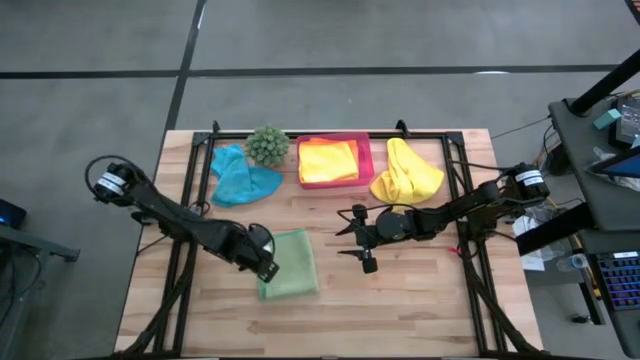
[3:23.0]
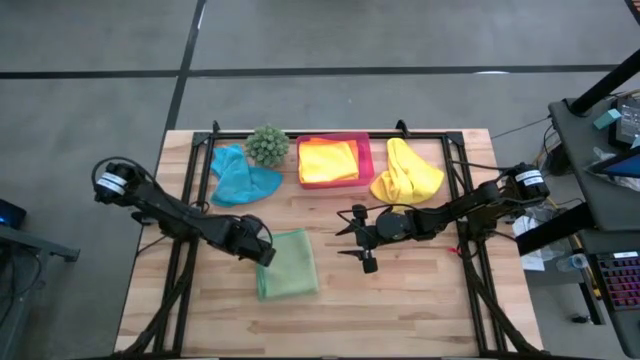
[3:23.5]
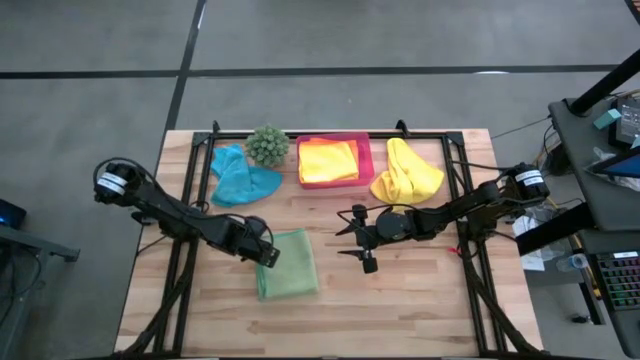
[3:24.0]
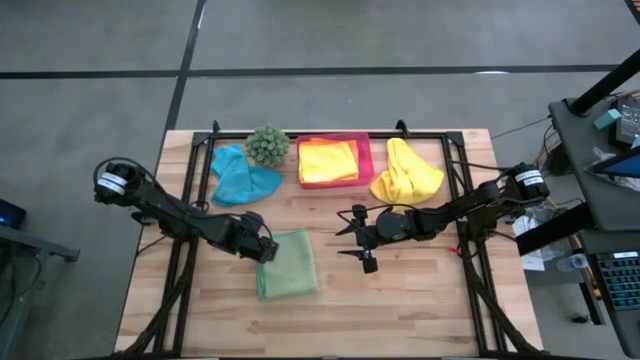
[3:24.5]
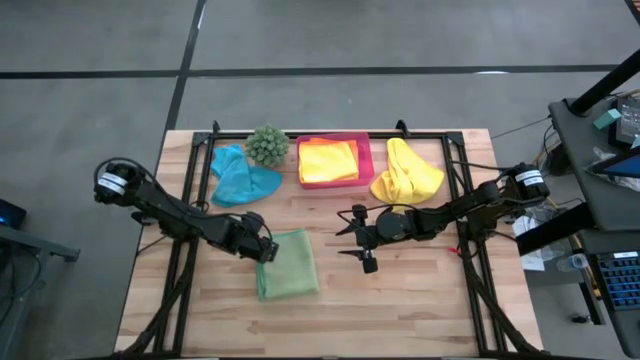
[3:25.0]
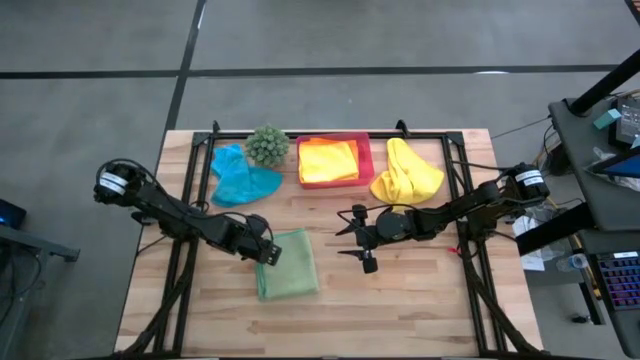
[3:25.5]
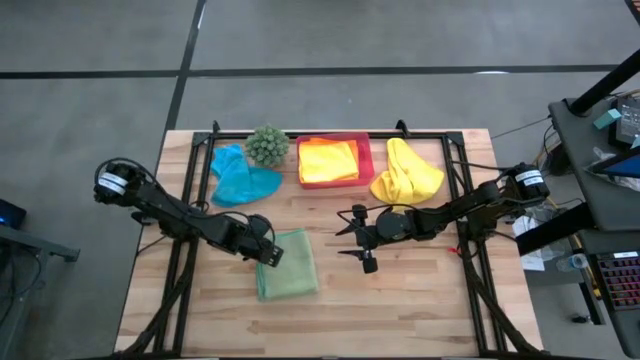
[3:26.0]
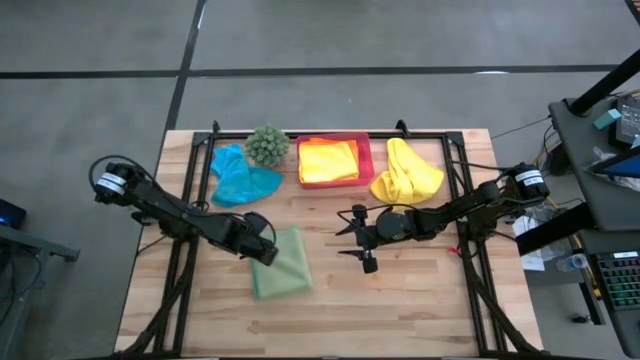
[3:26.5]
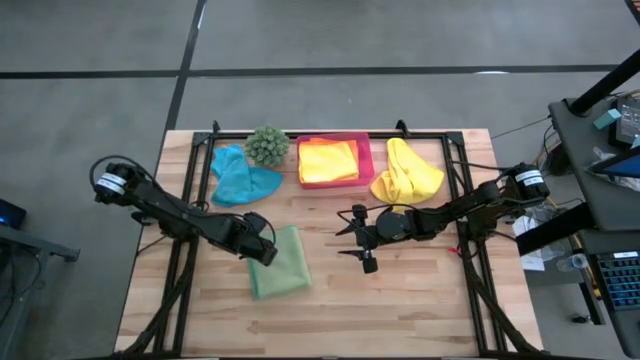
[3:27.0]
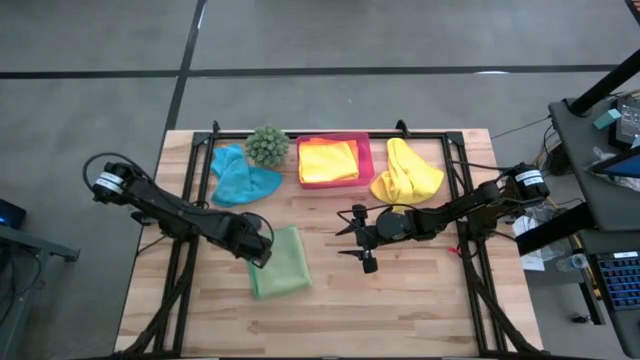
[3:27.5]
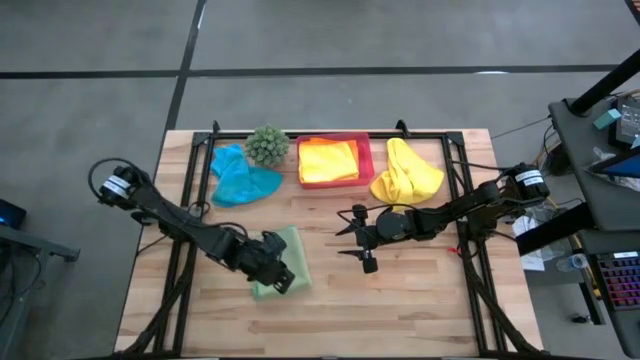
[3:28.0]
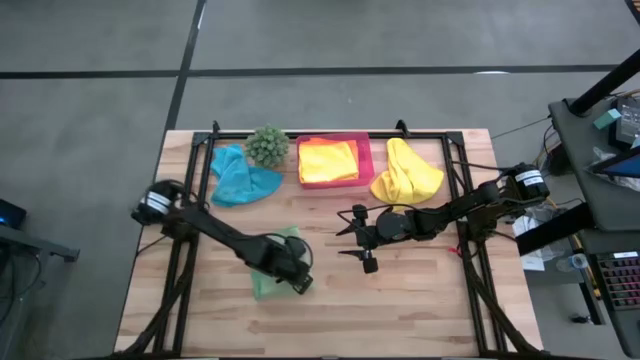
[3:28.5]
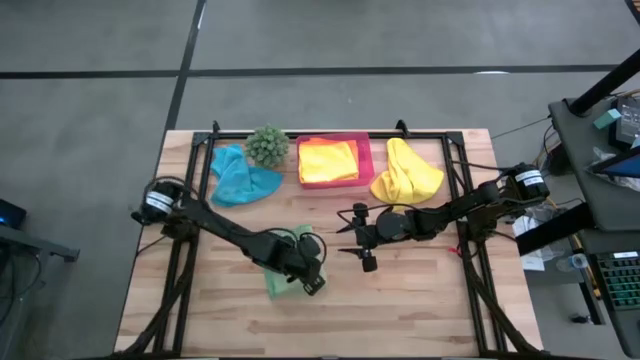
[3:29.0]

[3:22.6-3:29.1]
Task: Fold microfiber towels
Fold the green microfiber towel

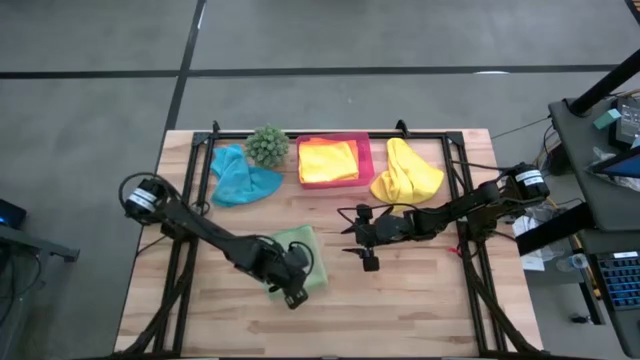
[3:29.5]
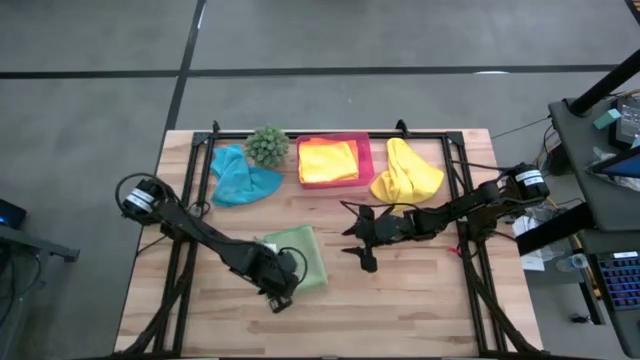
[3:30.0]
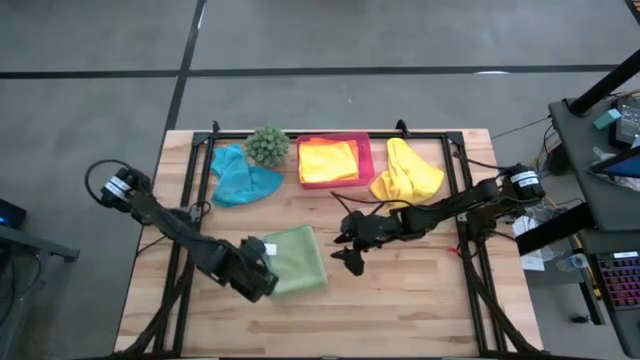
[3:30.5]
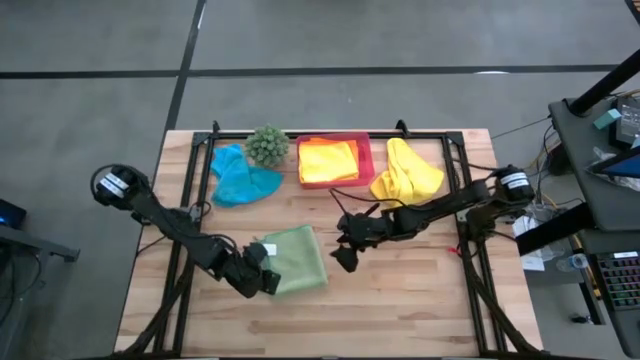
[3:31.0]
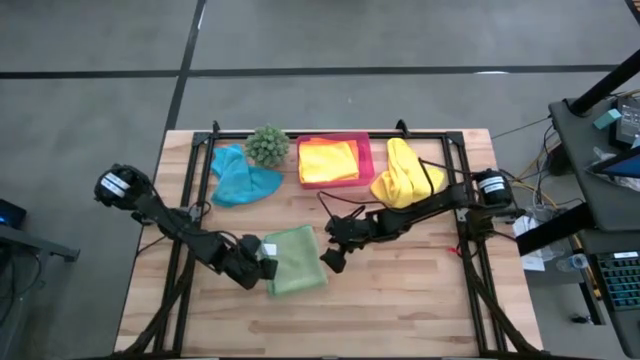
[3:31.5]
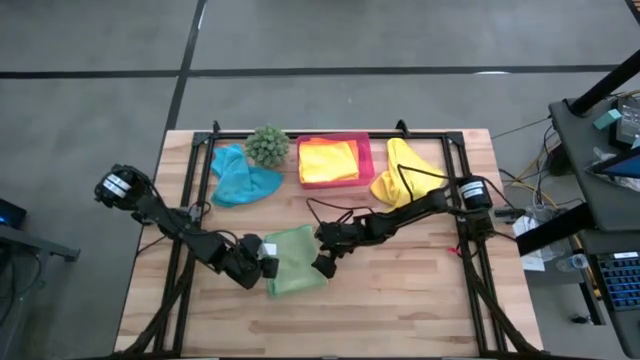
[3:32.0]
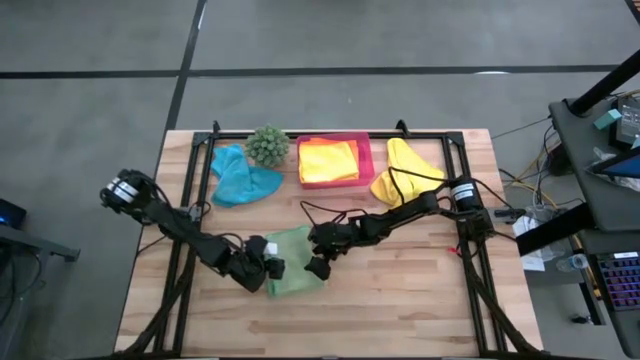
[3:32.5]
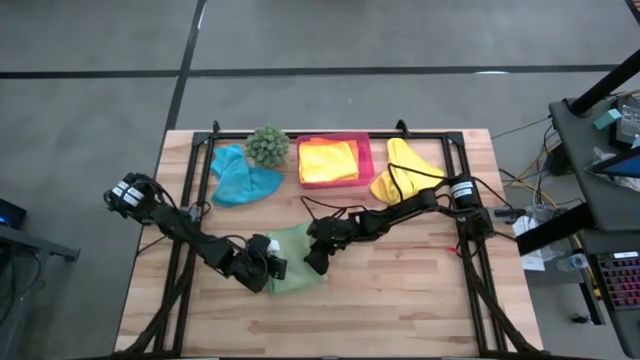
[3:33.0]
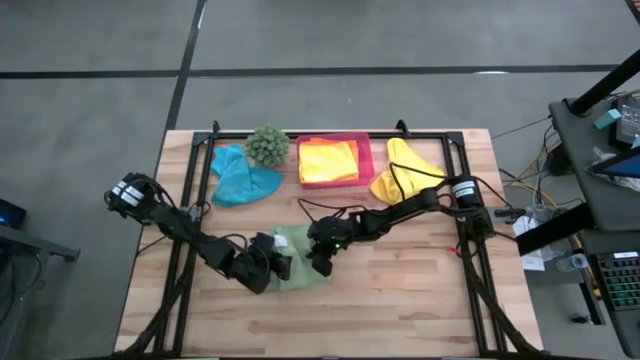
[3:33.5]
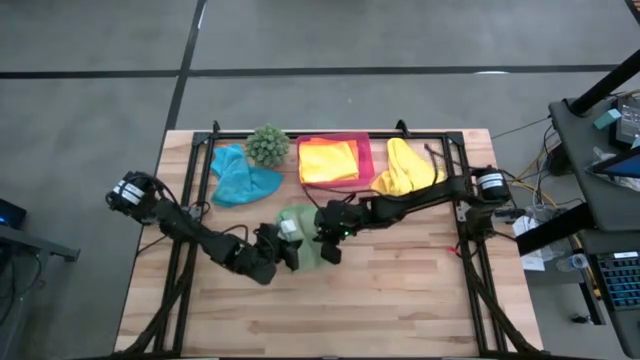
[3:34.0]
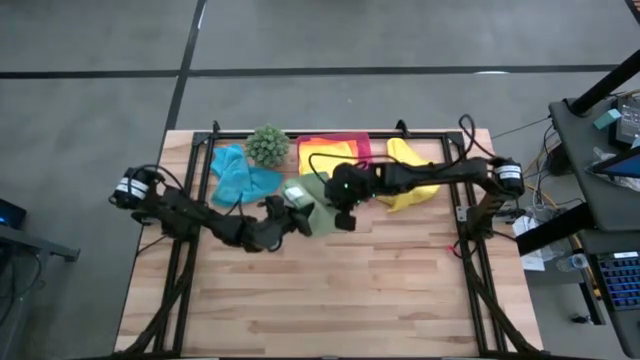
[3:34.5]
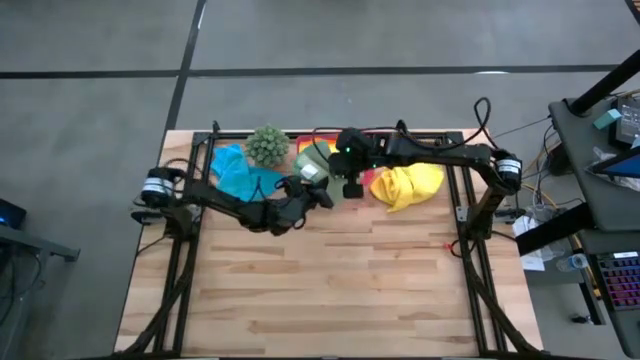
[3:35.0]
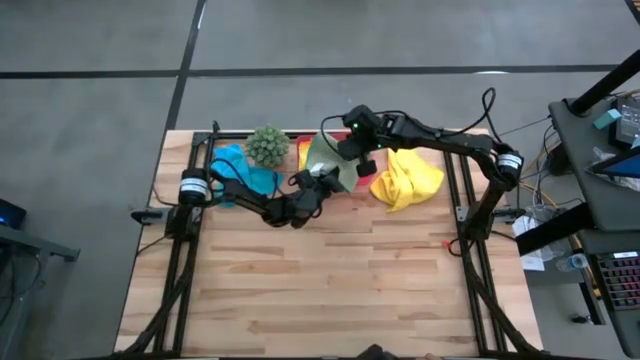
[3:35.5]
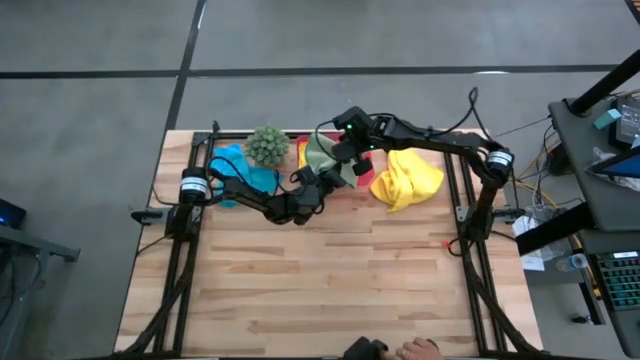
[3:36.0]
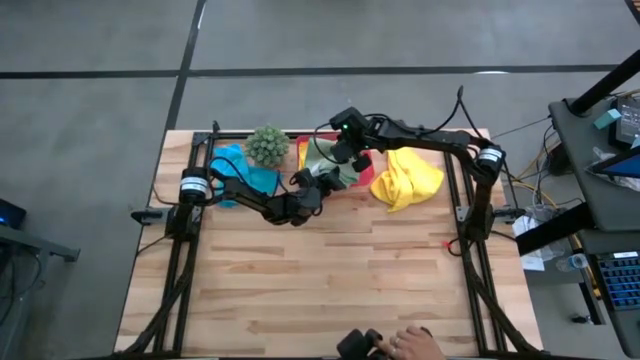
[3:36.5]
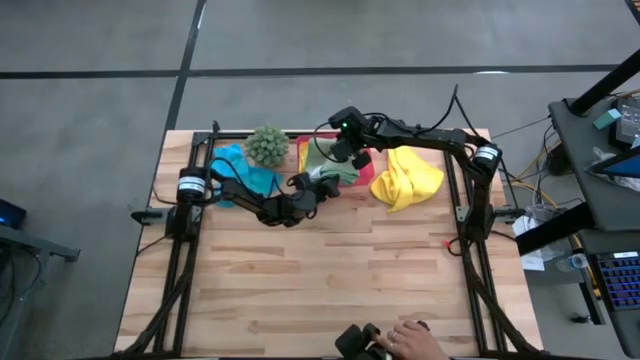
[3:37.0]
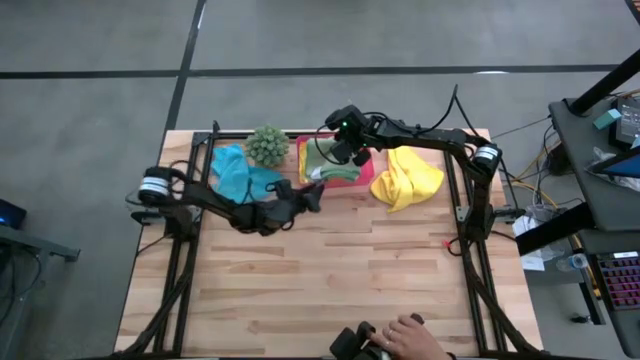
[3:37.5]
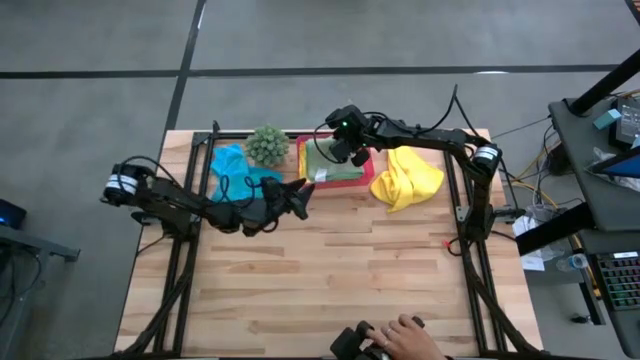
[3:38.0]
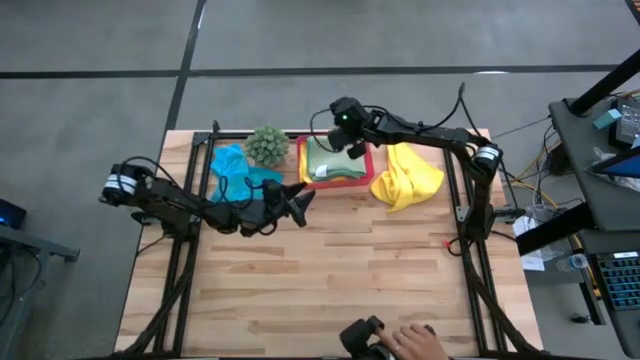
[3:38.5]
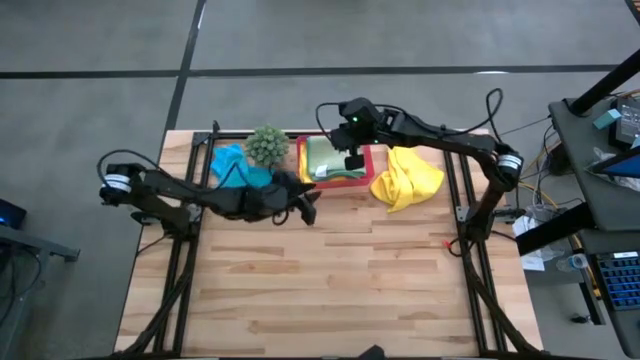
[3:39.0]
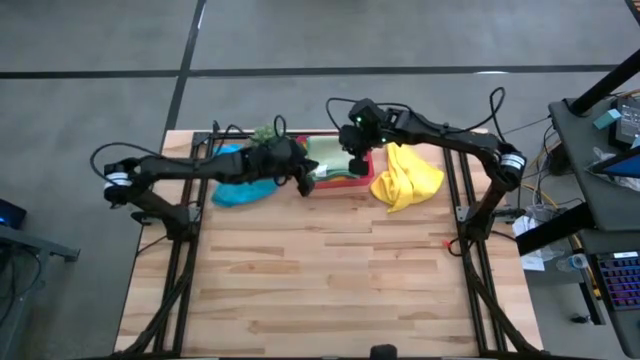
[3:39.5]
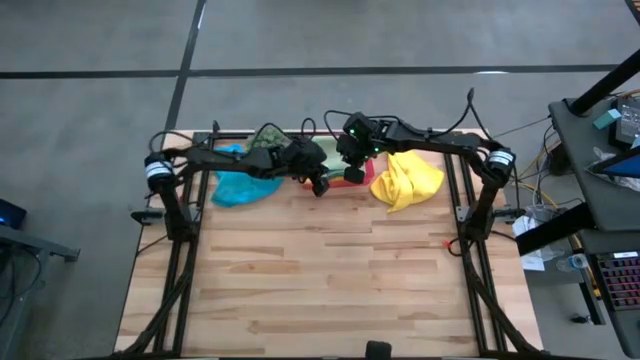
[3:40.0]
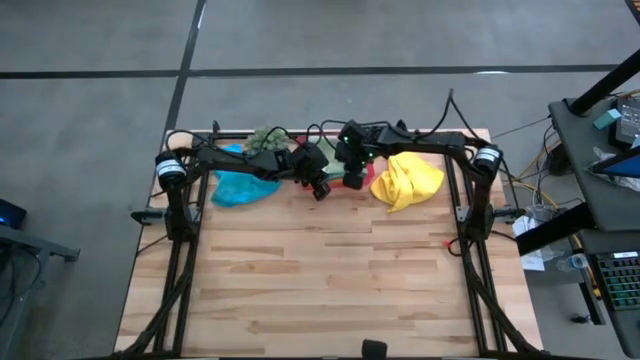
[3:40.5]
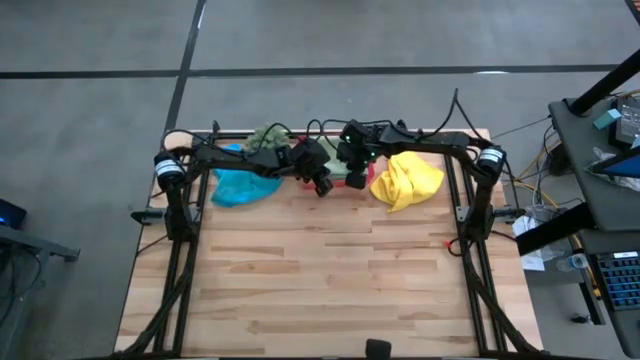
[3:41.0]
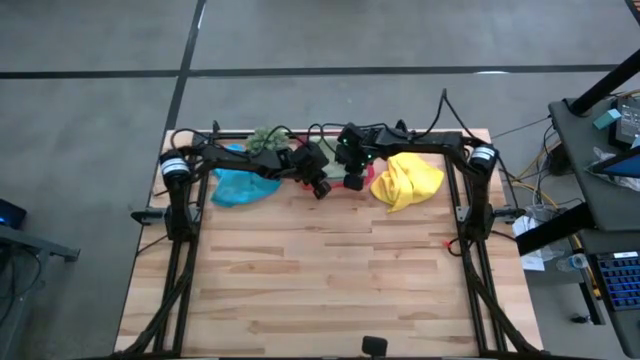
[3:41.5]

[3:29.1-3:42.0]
Put the folded green microfiber towel into red bin
